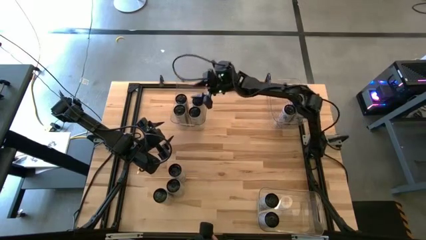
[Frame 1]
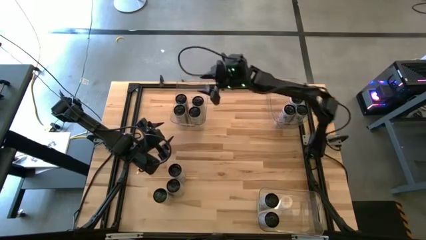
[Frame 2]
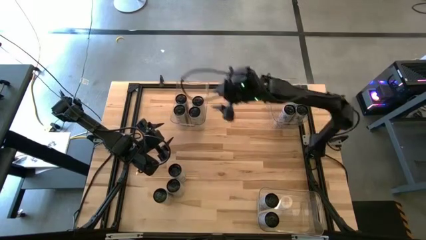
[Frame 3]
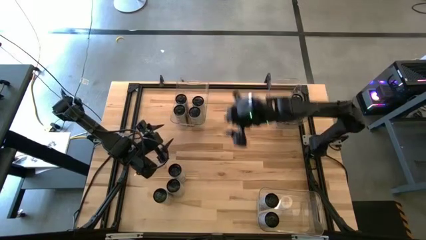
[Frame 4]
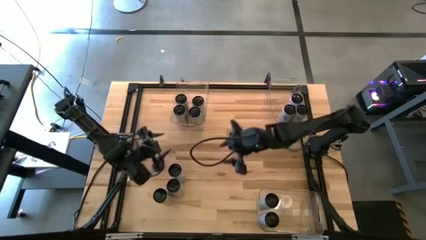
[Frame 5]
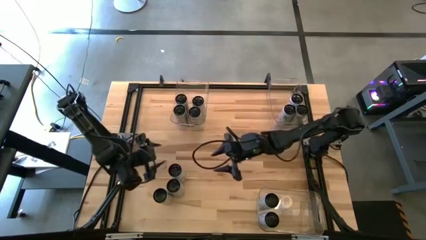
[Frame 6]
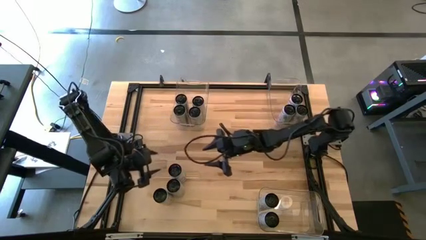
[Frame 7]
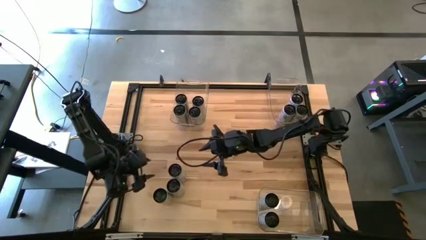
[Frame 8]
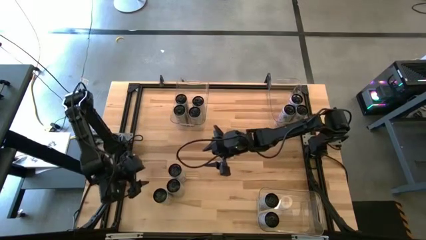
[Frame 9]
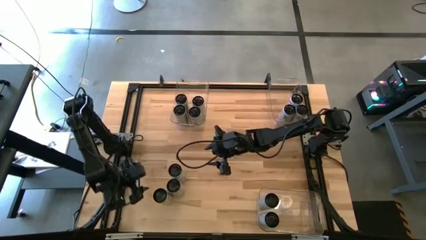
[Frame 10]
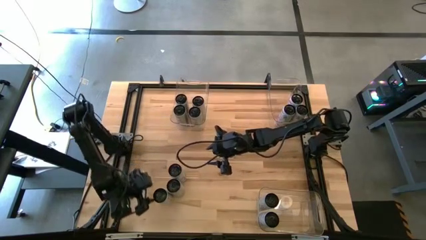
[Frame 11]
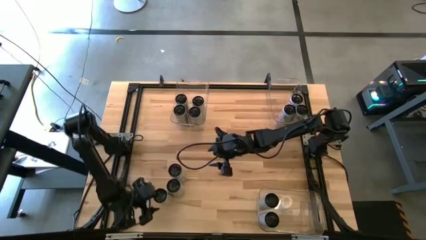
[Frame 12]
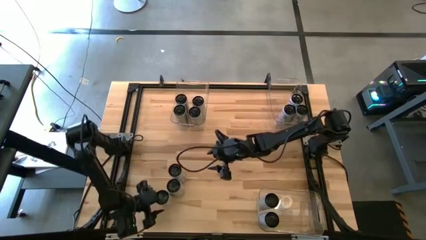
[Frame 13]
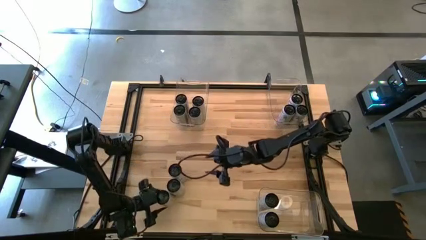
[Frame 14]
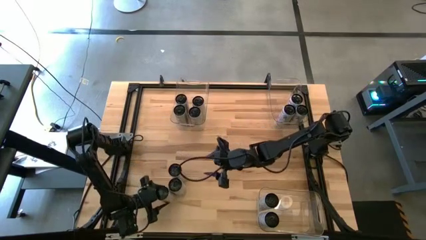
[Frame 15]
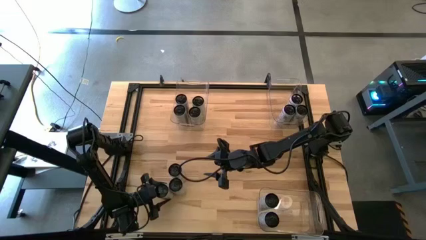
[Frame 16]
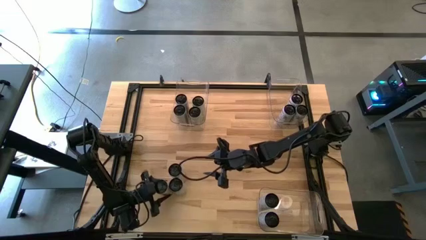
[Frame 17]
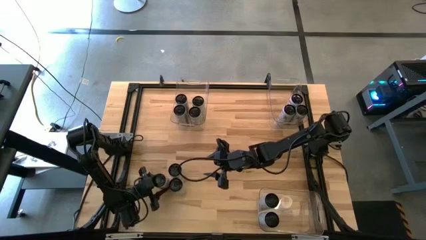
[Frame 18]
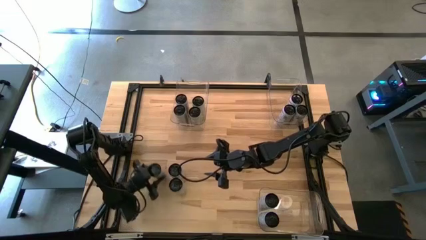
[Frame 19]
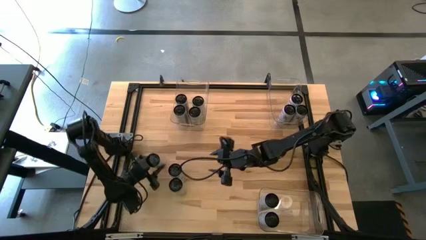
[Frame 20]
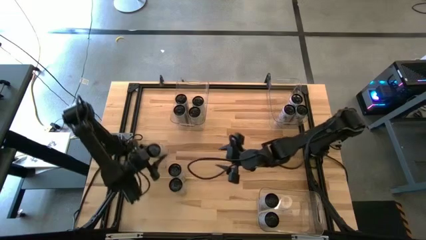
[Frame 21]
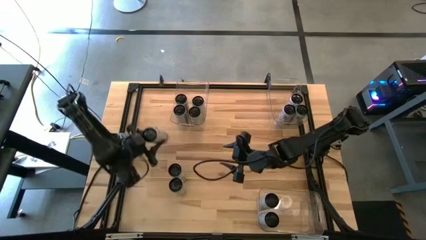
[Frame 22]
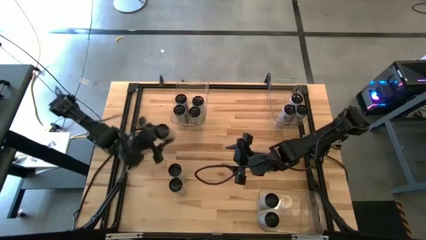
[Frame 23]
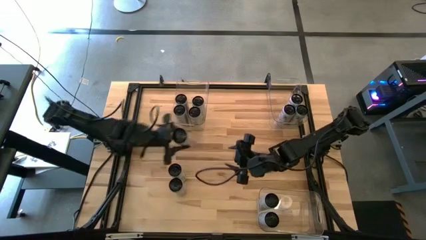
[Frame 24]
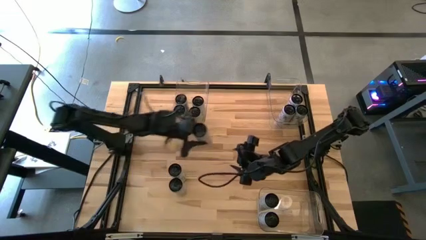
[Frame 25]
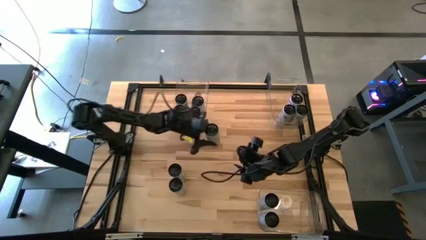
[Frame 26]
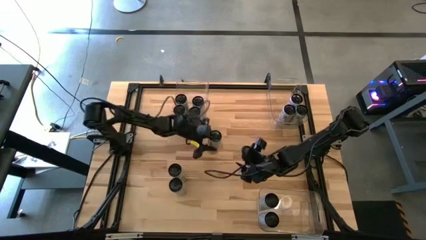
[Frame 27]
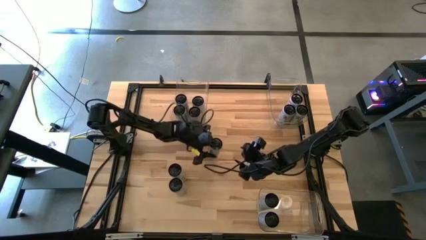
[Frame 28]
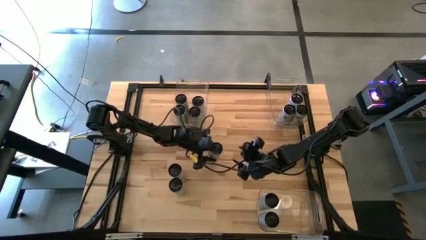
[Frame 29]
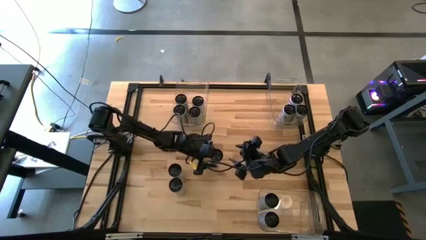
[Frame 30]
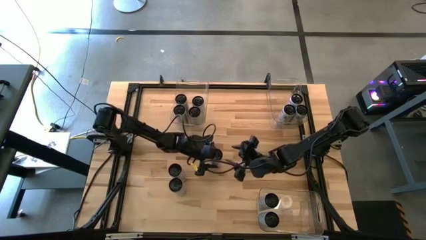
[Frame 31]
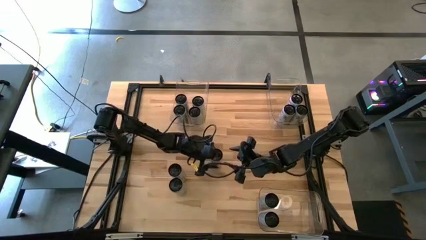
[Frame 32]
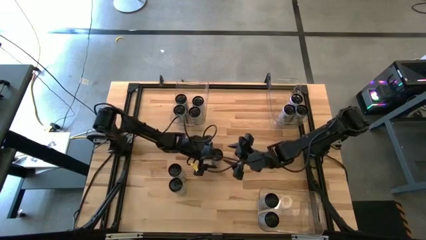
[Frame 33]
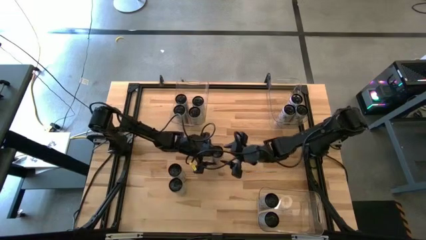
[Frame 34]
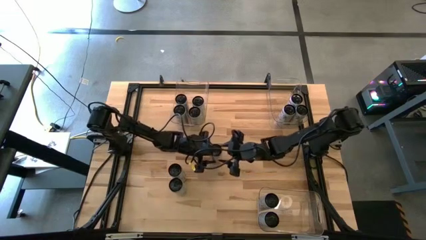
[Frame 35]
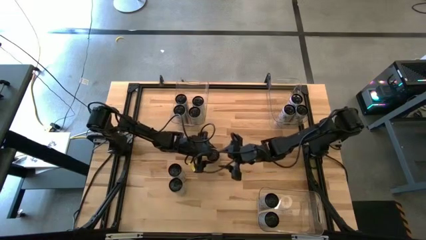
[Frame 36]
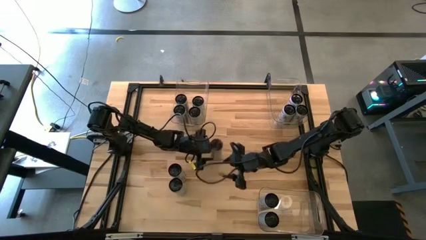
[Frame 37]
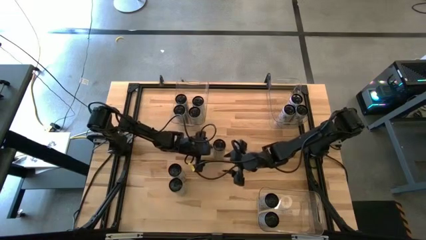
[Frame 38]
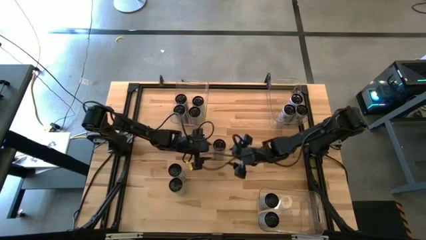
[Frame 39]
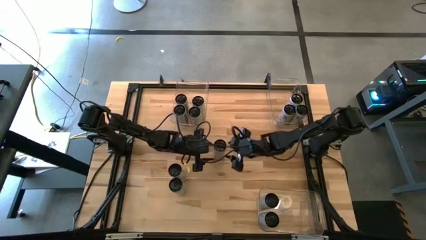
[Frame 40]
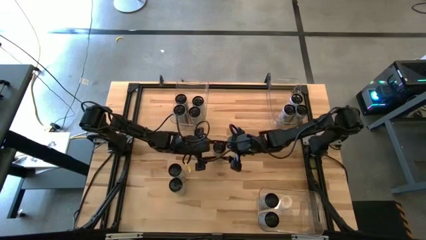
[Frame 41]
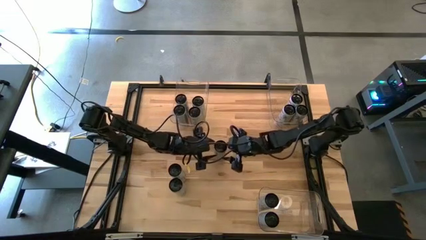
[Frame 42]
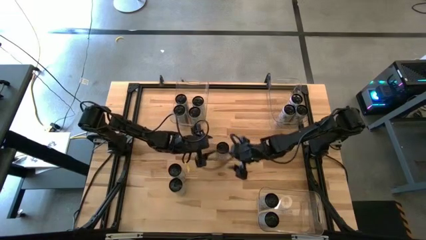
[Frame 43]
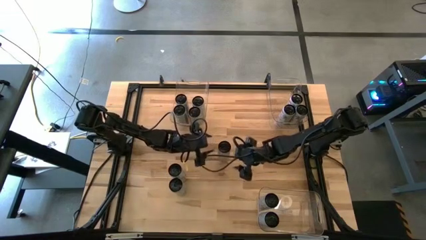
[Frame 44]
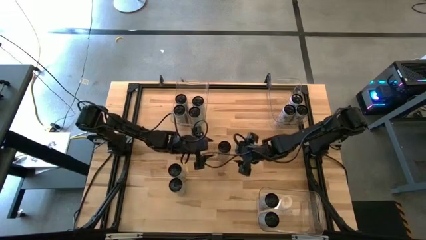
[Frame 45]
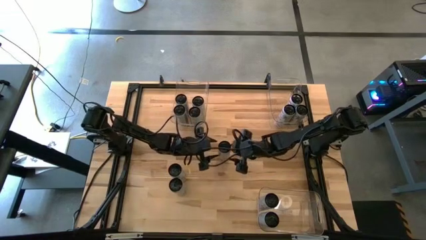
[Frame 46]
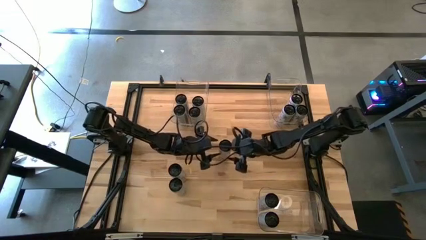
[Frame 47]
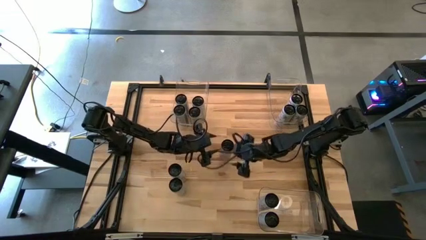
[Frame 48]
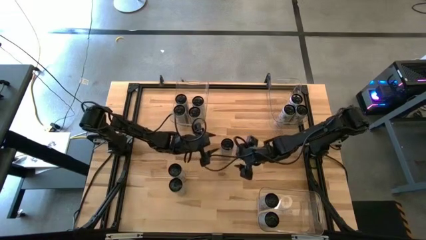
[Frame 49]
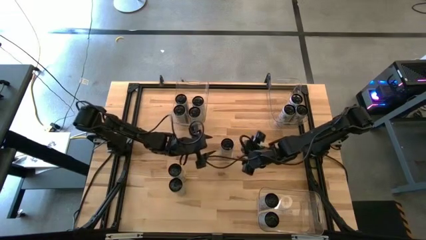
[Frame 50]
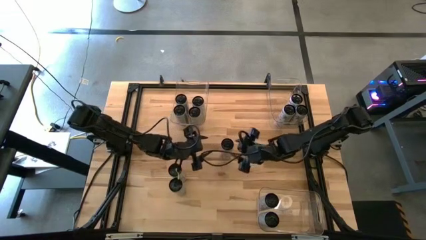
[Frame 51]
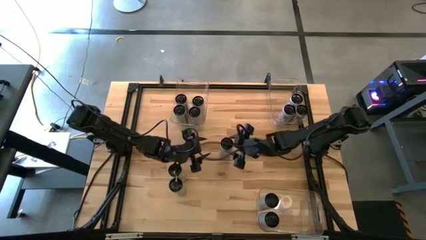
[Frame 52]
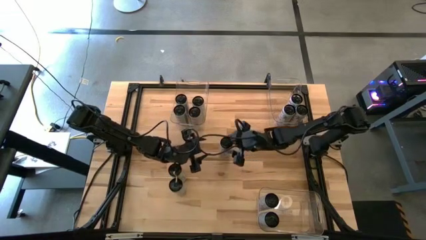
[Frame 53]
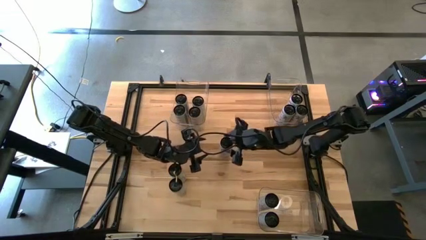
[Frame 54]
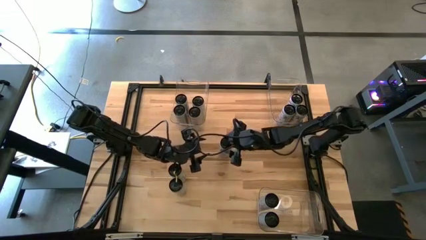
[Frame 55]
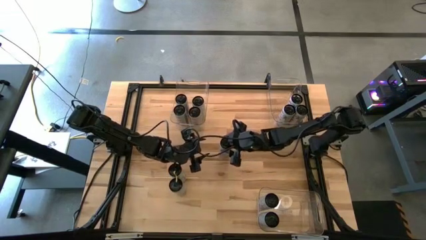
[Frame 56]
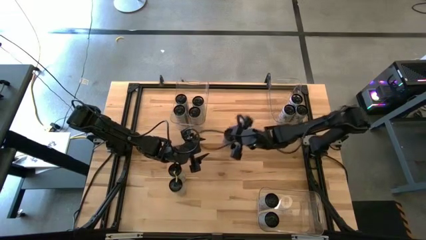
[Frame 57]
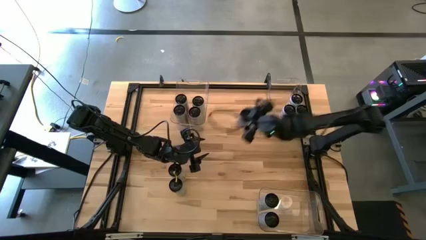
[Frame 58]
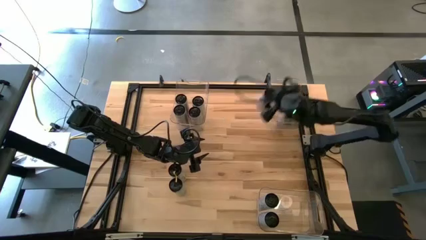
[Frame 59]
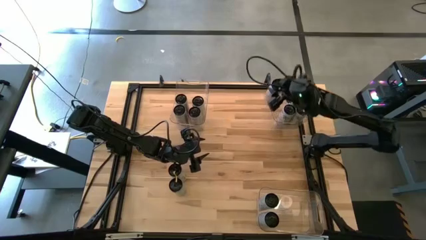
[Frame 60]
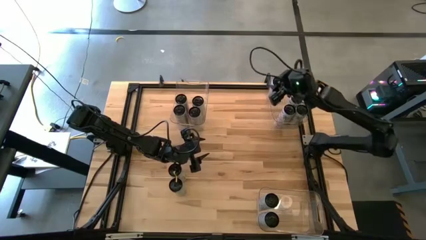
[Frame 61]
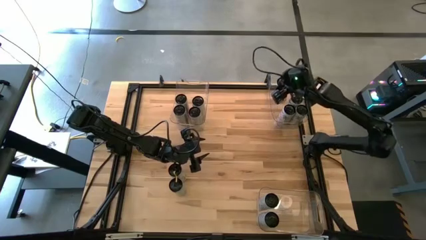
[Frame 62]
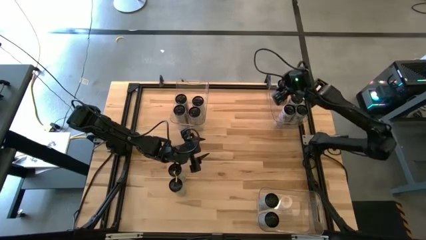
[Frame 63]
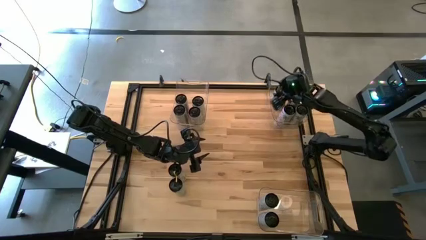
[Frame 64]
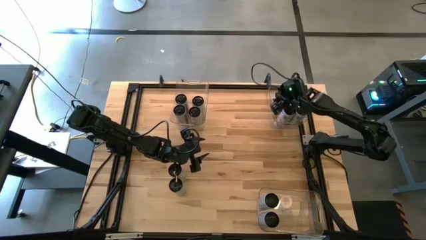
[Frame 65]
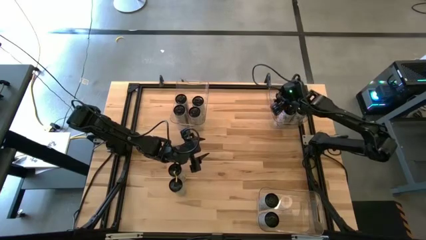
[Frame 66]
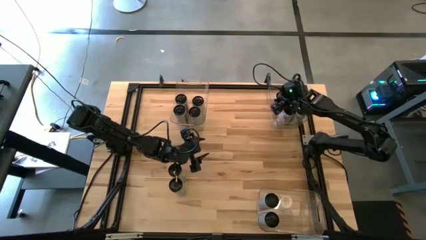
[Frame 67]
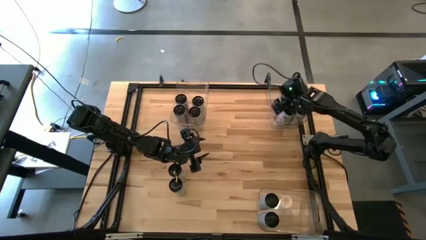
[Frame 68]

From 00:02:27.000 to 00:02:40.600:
Task: Sort soda cans
Put the white/pink soda can into the top right transparent bin
